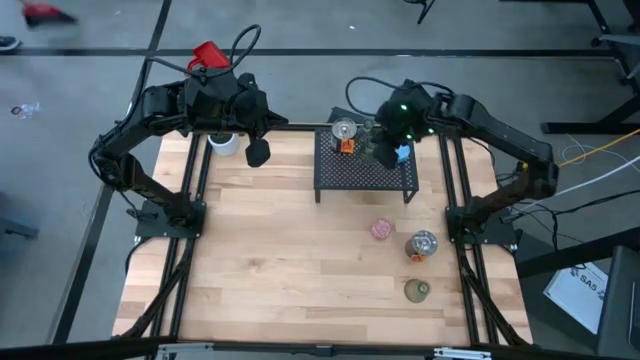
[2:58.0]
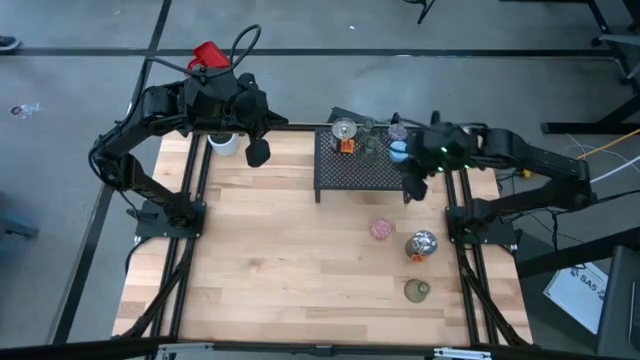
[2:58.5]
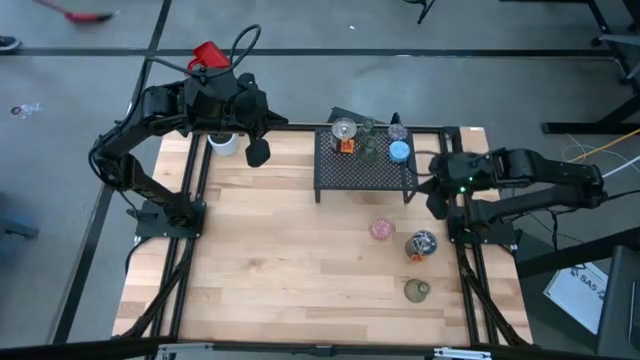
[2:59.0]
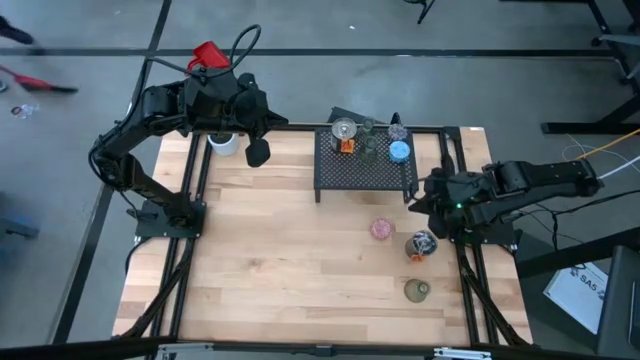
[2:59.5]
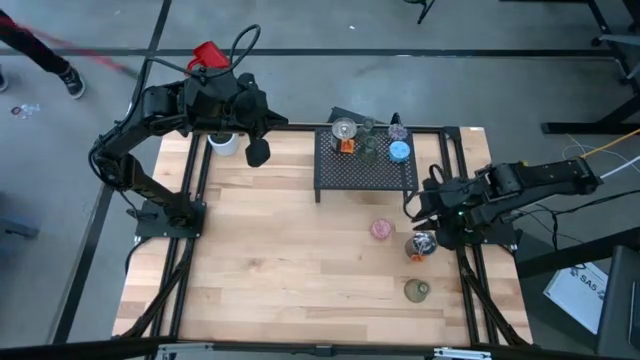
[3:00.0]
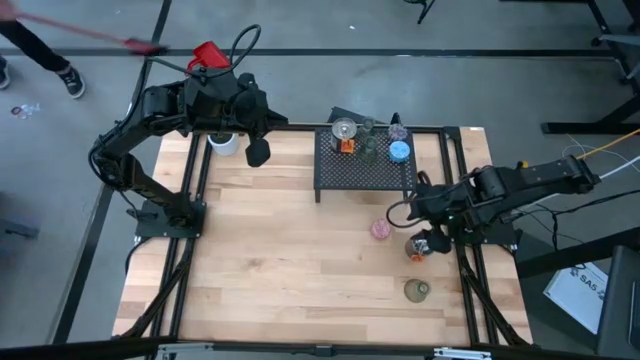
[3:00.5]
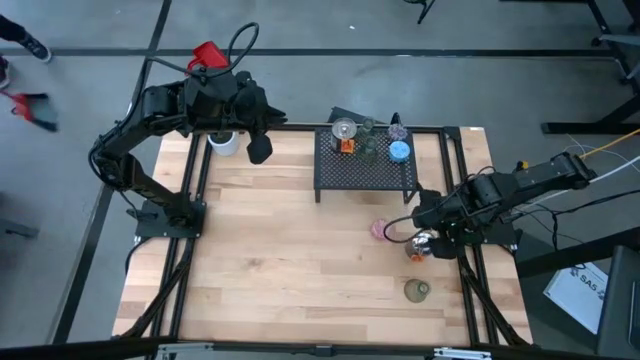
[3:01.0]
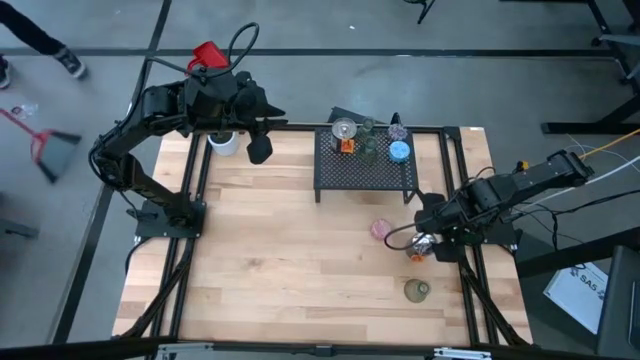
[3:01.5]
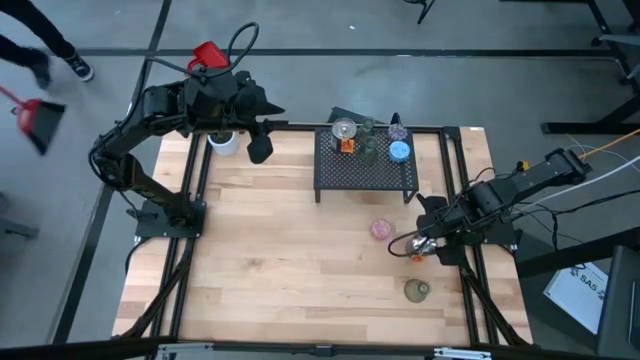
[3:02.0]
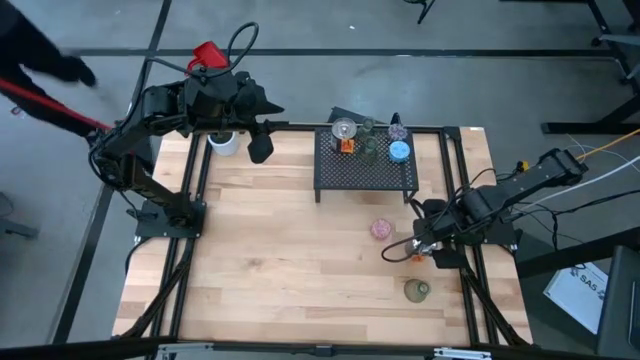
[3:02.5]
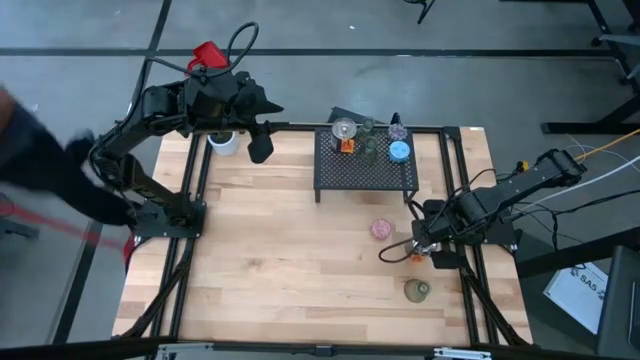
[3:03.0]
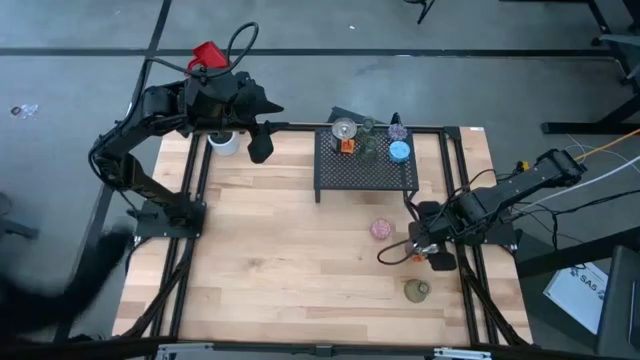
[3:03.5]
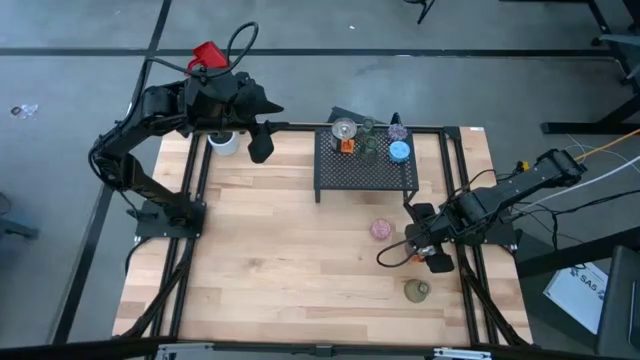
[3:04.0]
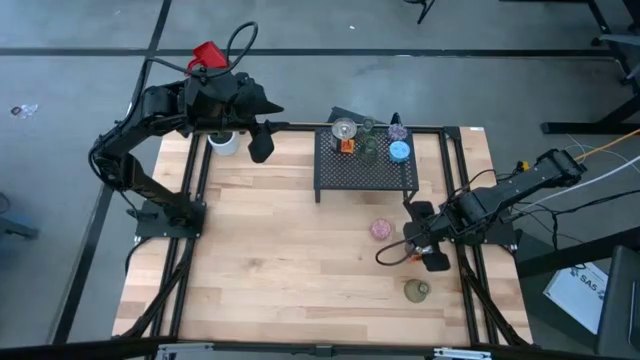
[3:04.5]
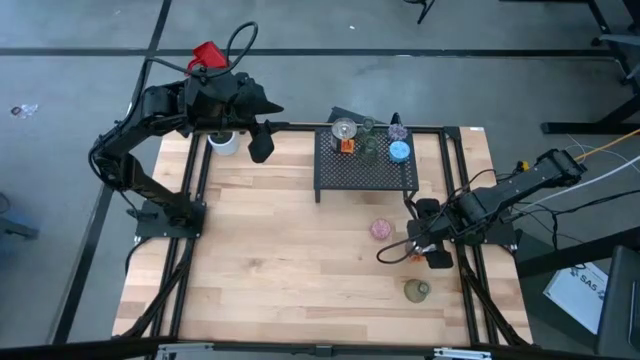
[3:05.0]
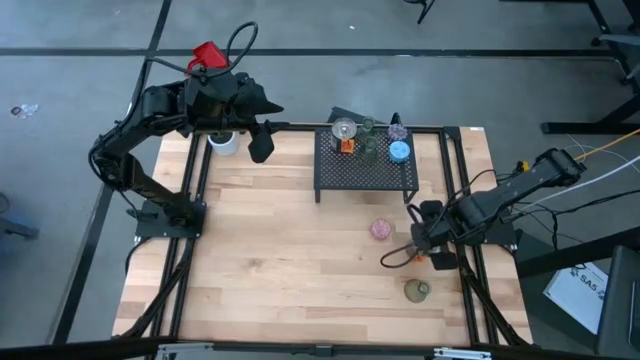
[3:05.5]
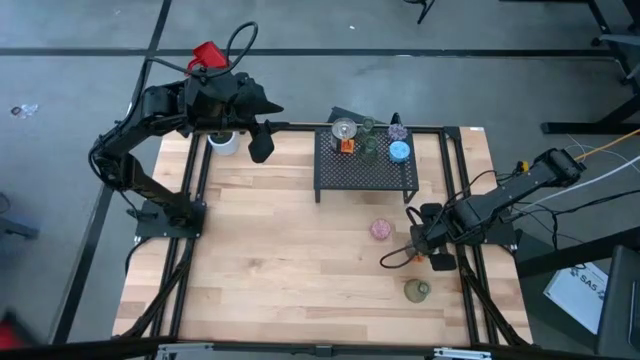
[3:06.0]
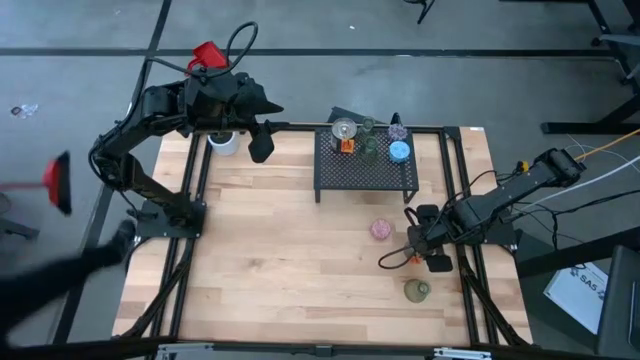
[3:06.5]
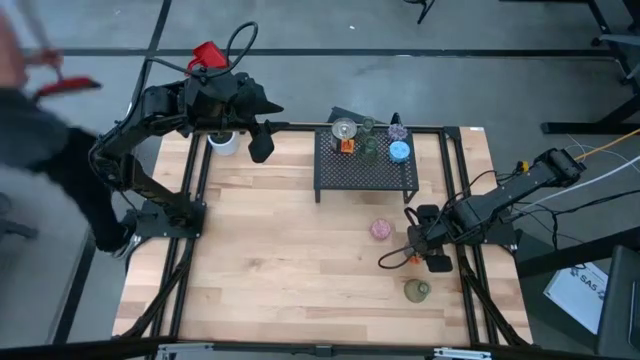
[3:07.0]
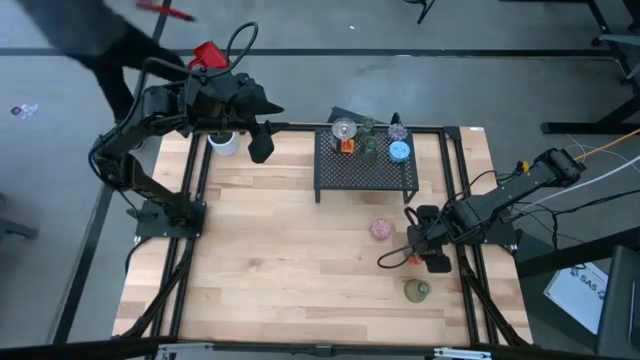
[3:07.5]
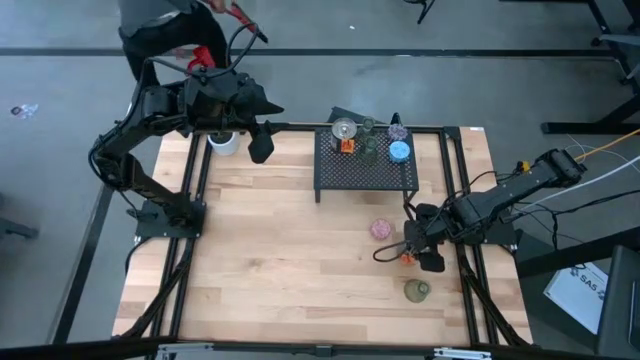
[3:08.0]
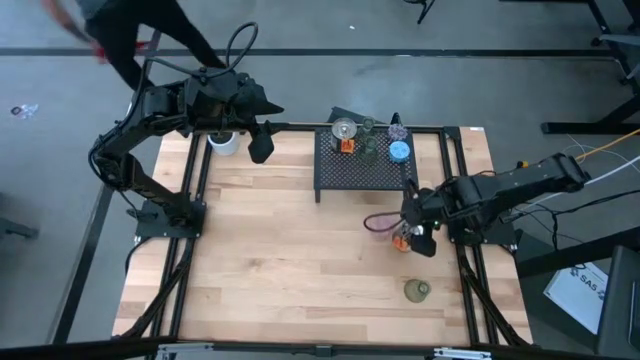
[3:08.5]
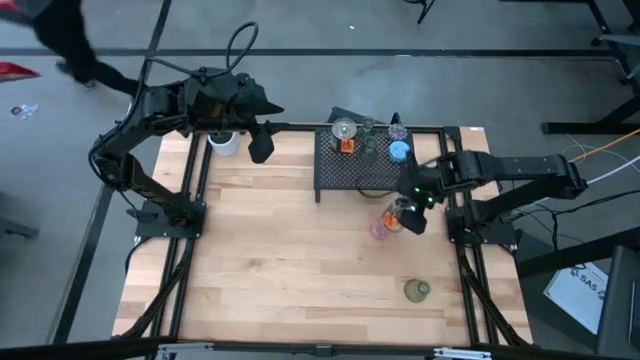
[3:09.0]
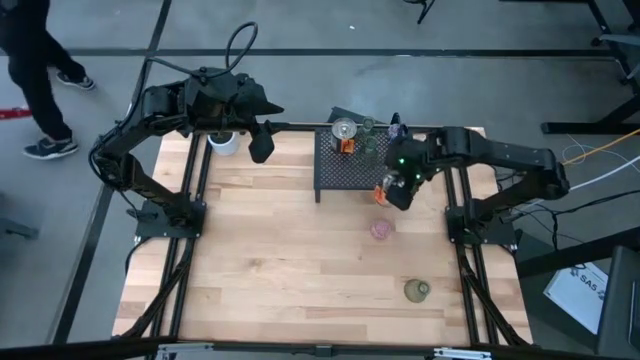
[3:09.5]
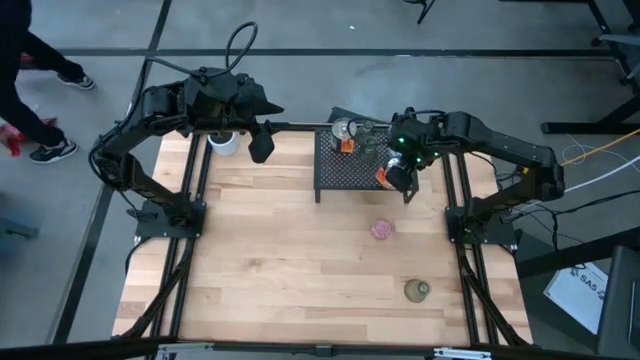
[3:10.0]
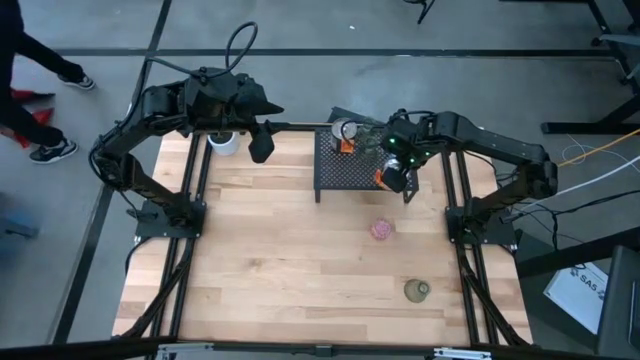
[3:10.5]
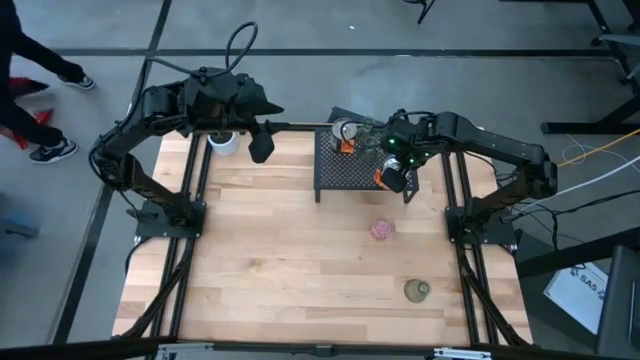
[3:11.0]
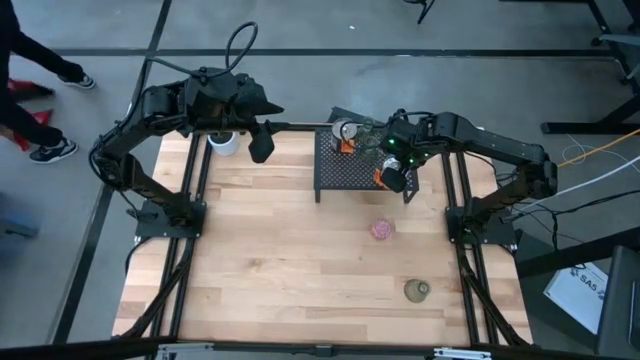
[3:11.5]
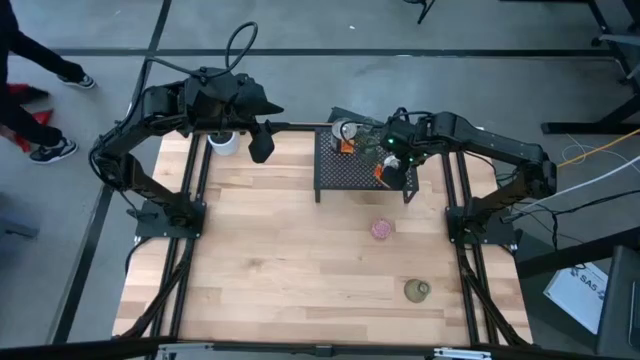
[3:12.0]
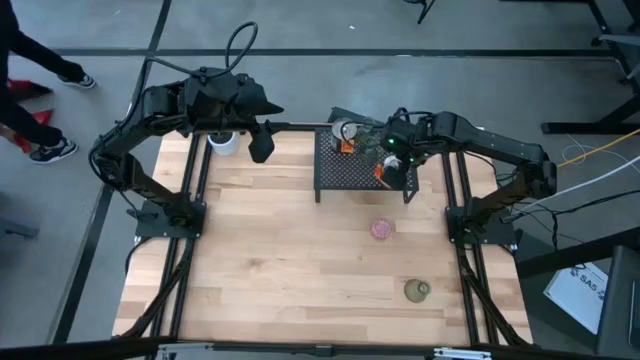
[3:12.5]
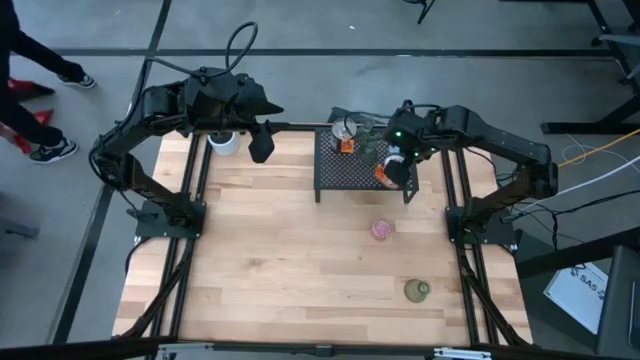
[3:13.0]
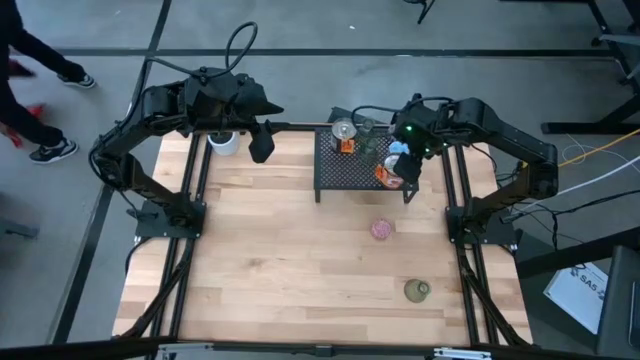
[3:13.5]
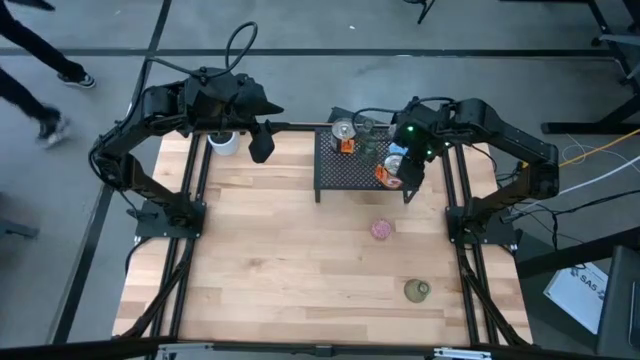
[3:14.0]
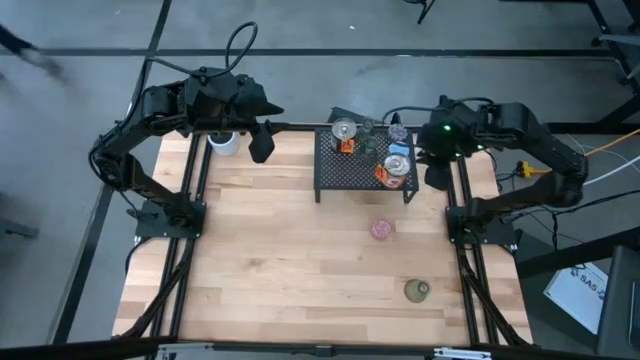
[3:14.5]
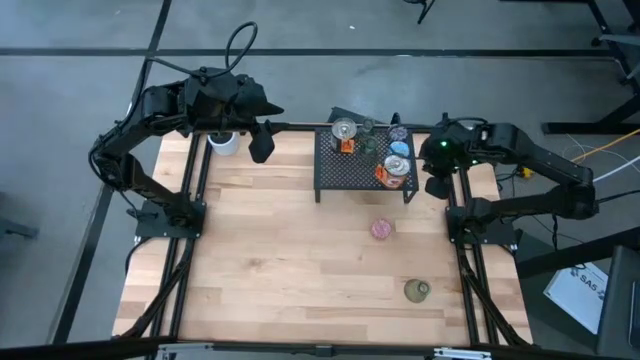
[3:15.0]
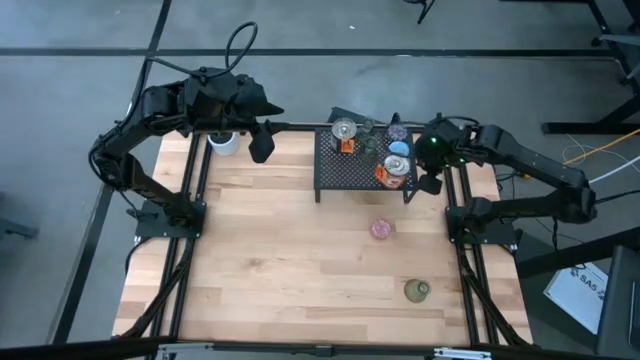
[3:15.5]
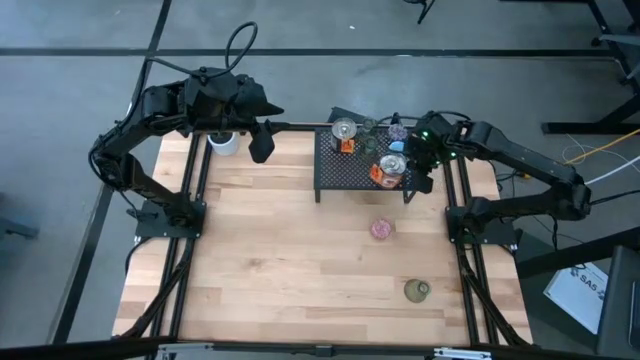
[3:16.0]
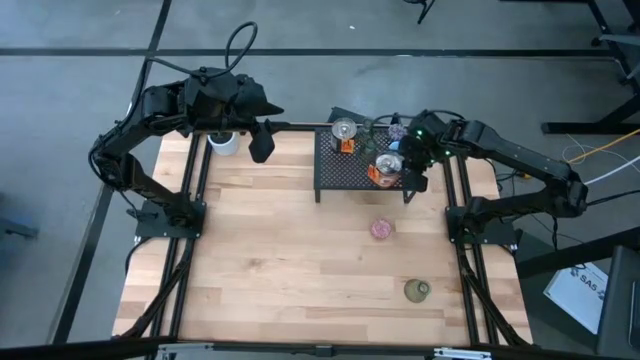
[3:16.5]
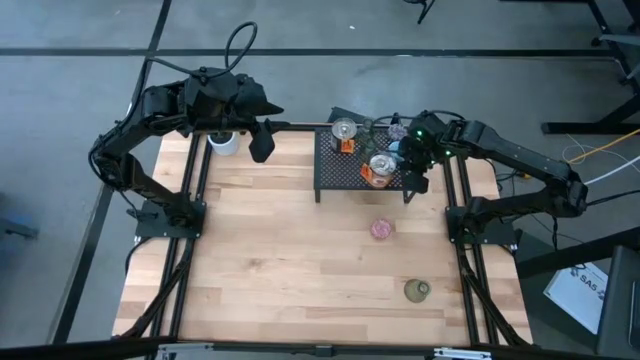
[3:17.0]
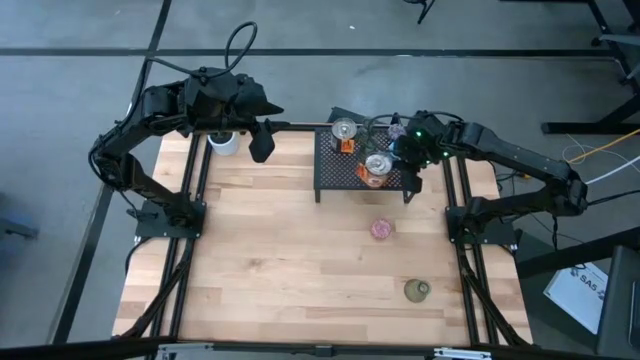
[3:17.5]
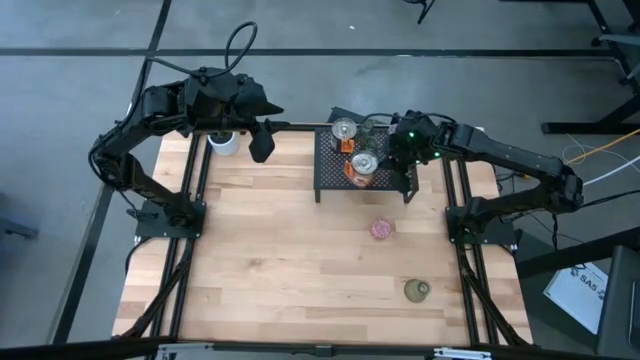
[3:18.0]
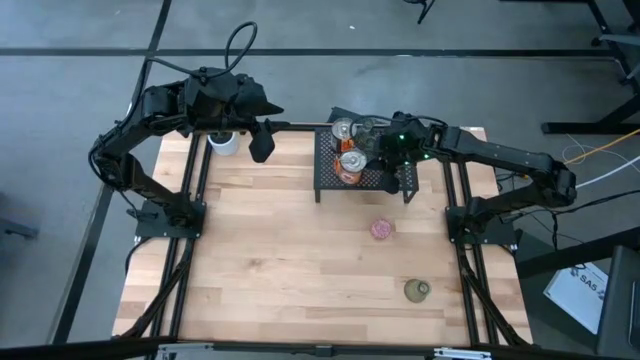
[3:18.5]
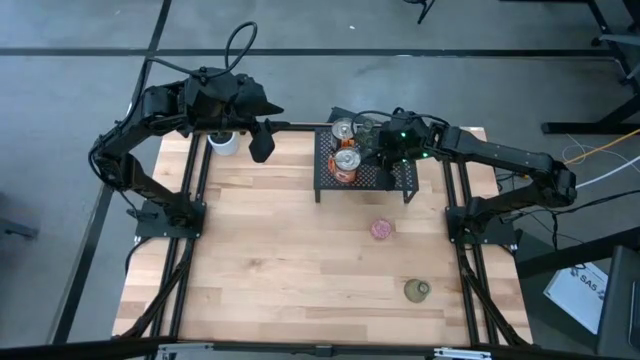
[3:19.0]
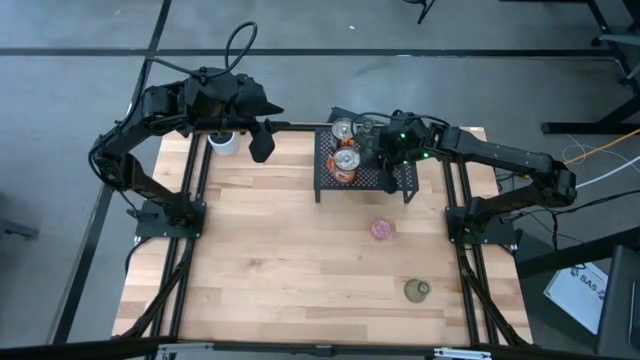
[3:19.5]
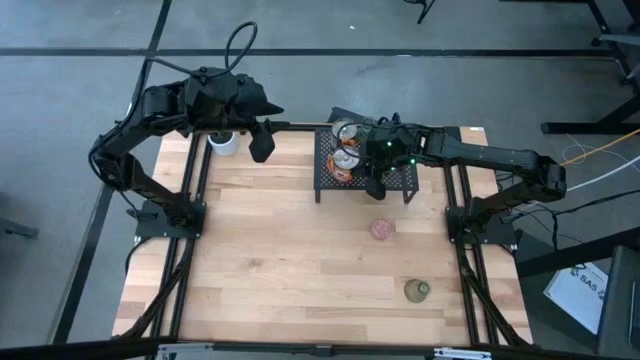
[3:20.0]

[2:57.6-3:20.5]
Task: Pick & Place candle stick holders
Put the silver scented candle on the shelf aligned with other silver scented candle
